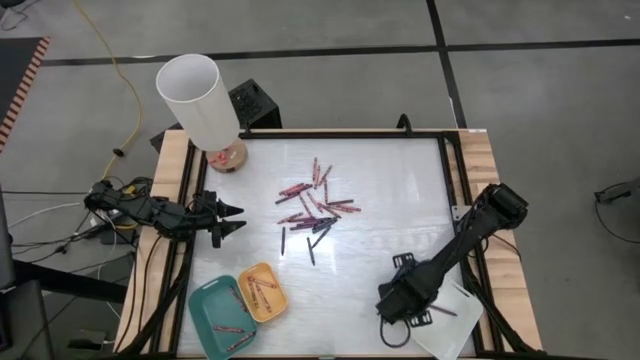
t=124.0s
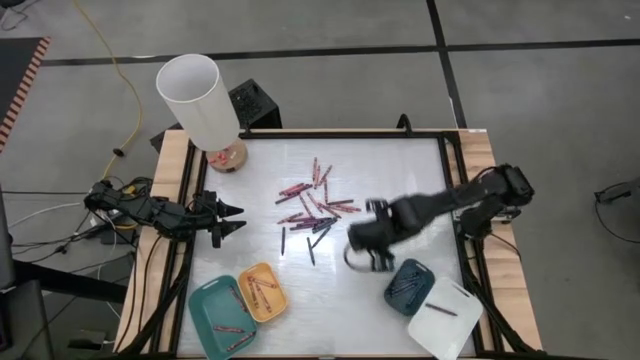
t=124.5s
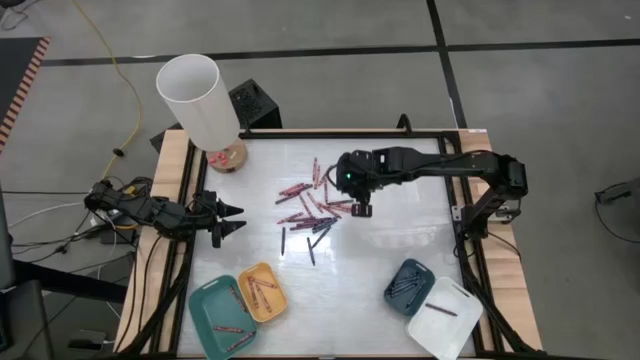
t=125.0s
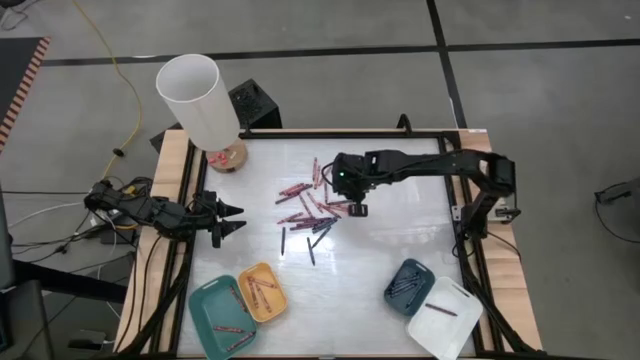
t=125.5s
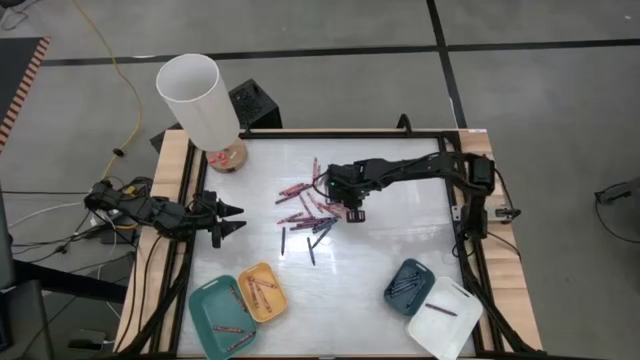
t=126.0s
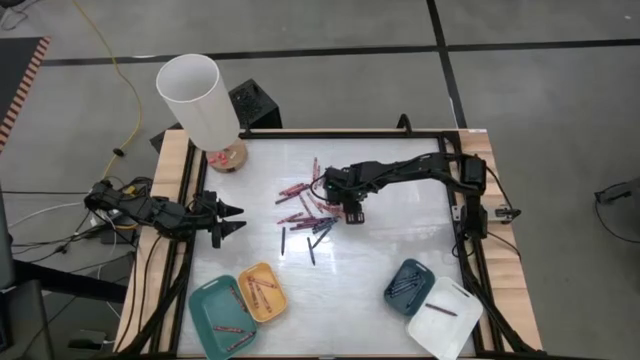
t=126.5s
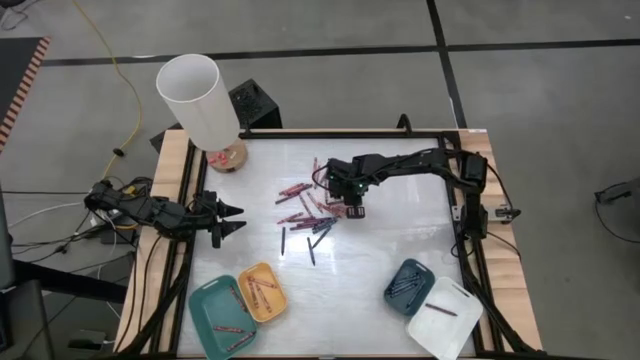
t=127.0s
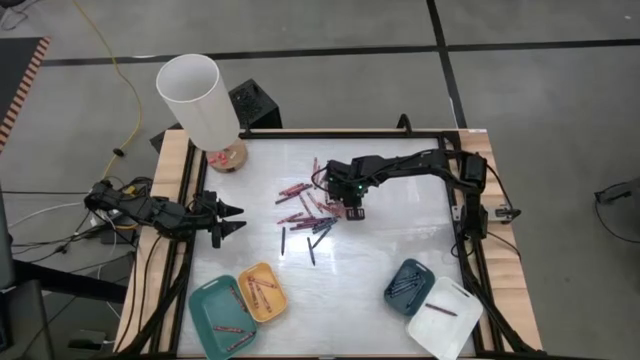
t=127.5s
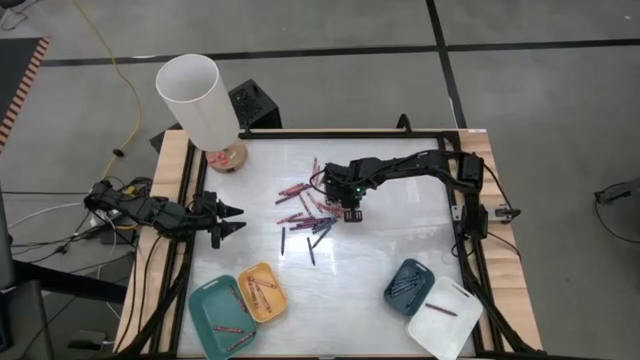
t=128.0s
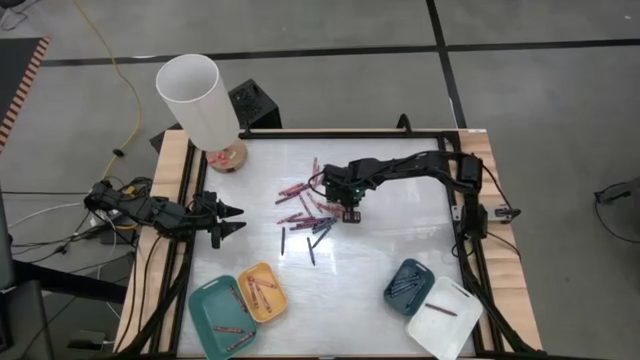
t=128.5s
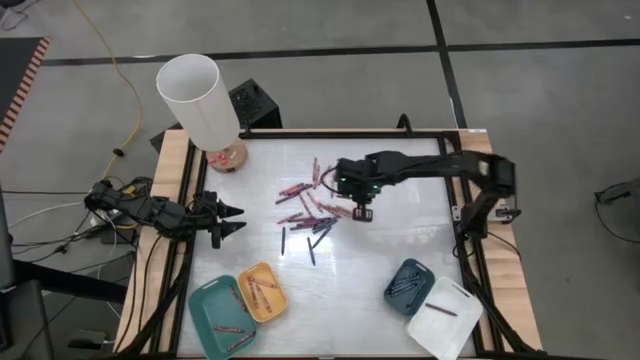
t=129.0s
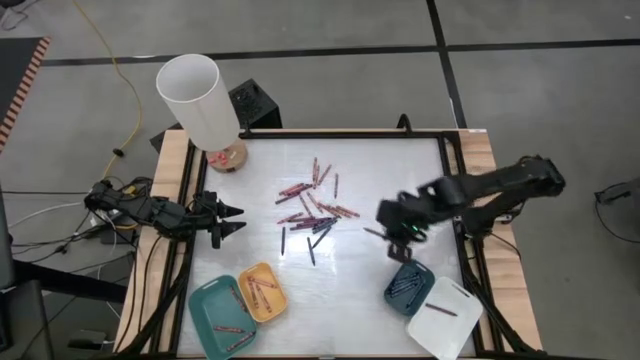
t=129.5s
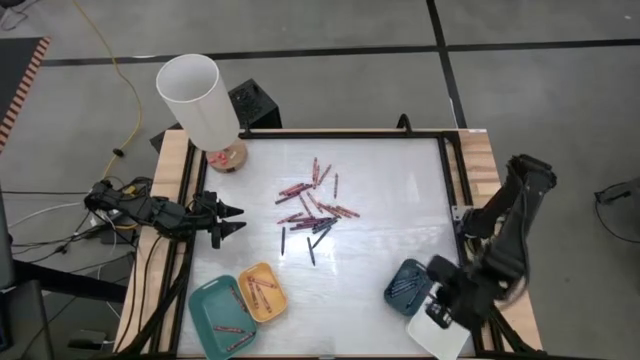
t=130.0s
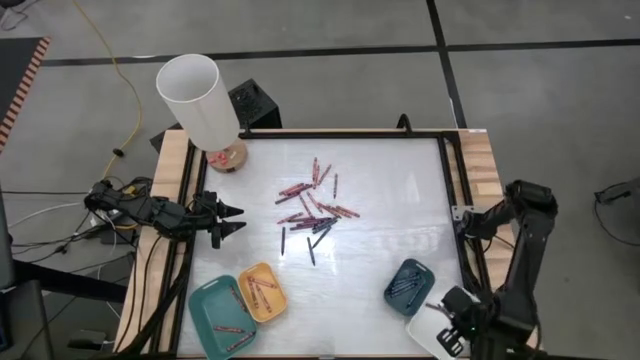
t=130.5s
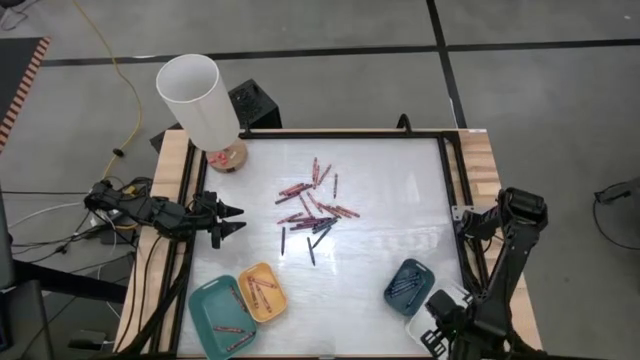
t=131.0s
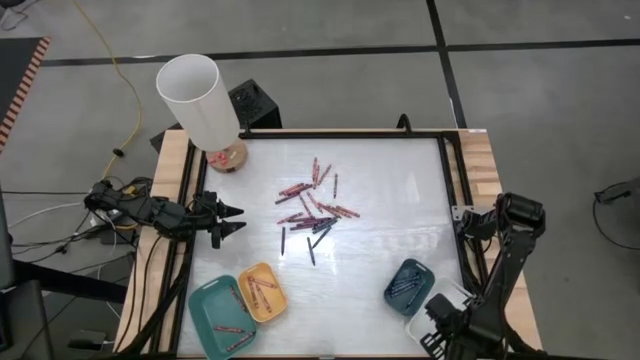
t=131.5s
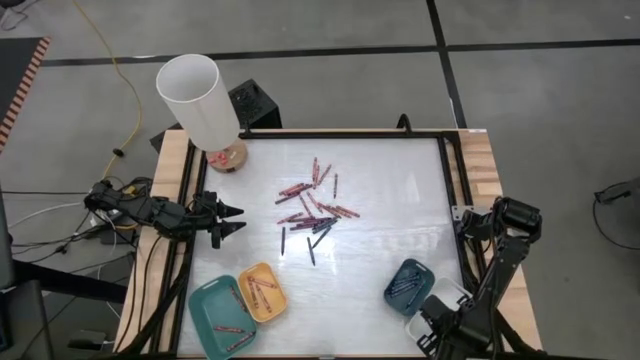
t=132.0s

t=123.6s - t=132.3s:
Task: Sort crayons
Put the purple crayon into the white bin

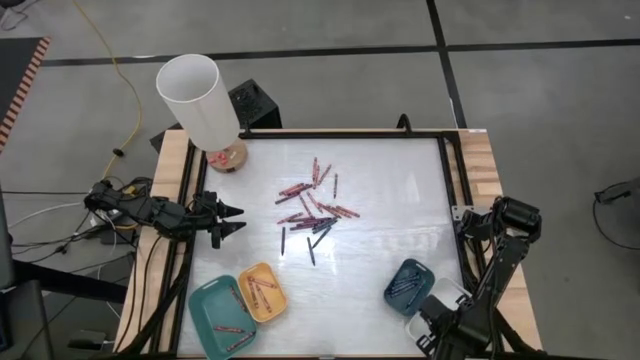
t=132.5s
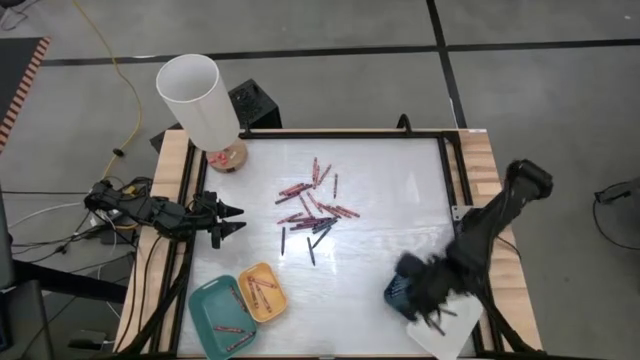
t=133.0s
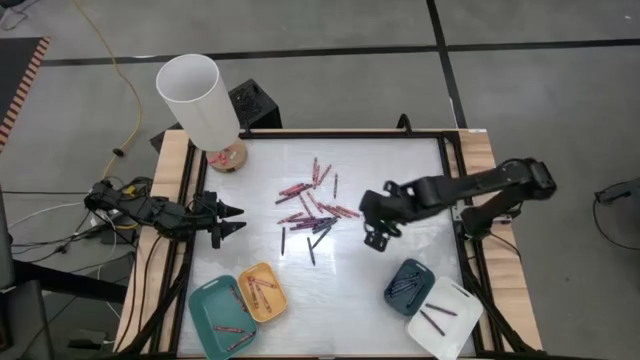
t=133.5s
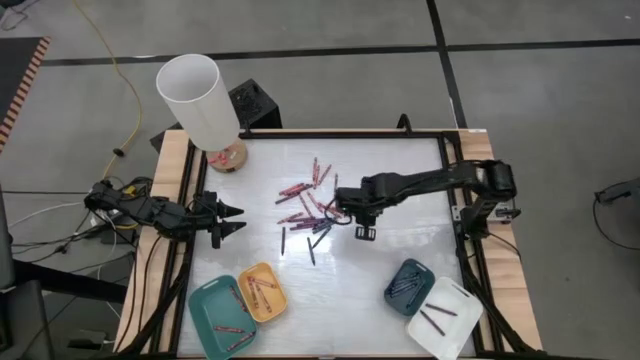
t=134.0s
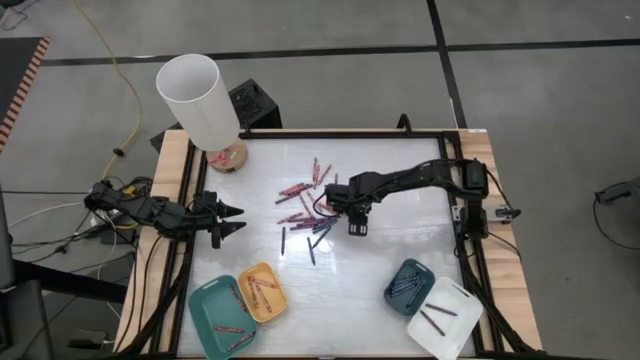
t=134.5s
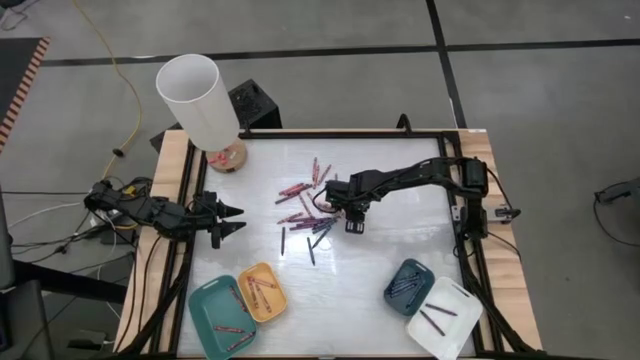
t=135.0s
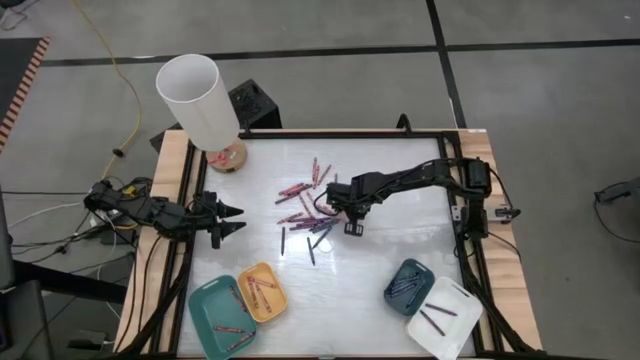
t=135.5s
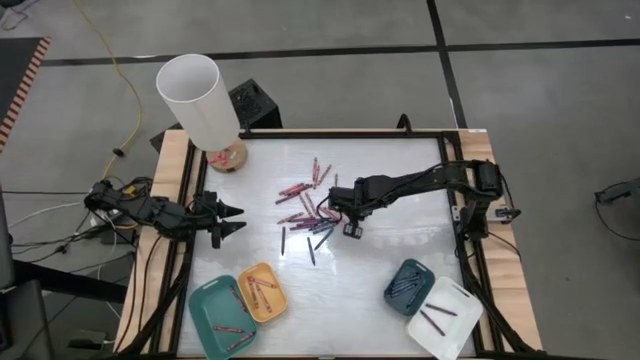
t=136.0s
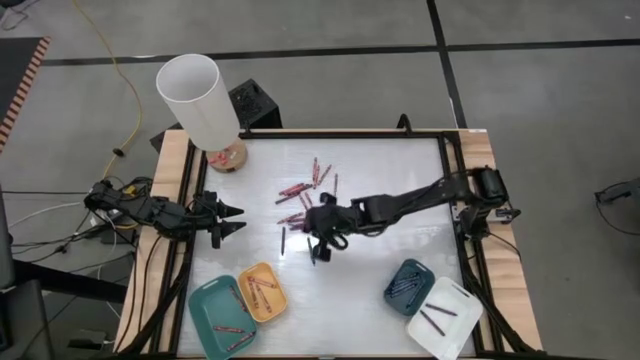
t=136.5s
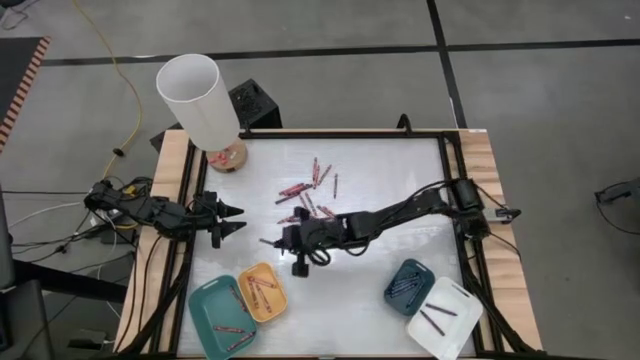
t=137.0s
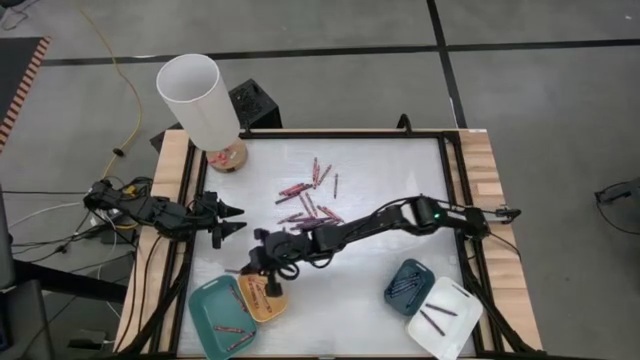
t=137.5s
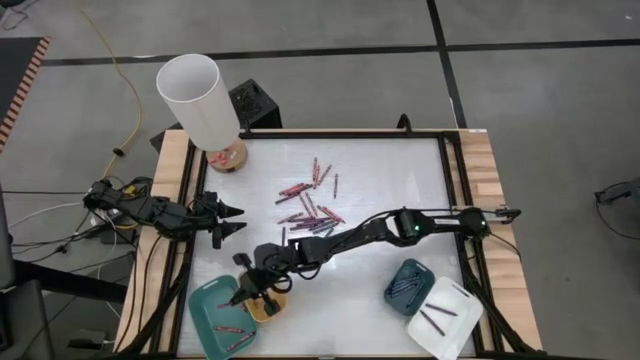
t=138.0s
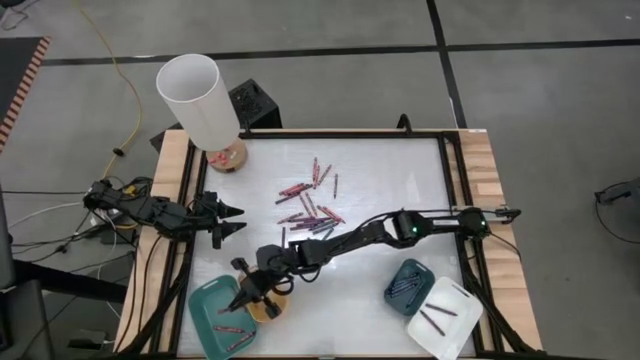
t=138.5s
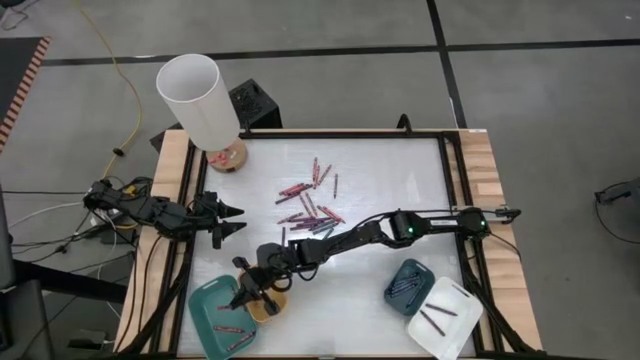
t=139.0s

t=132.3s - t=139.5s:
Put the red crayon into the blue bin

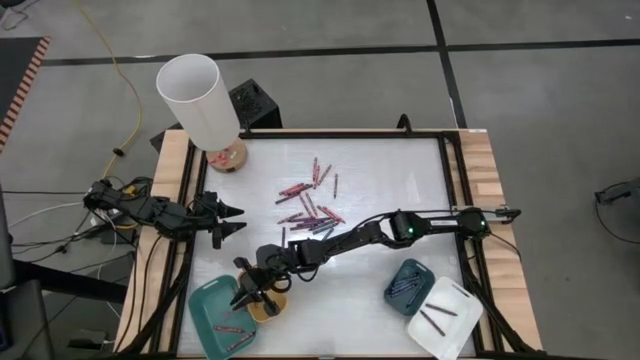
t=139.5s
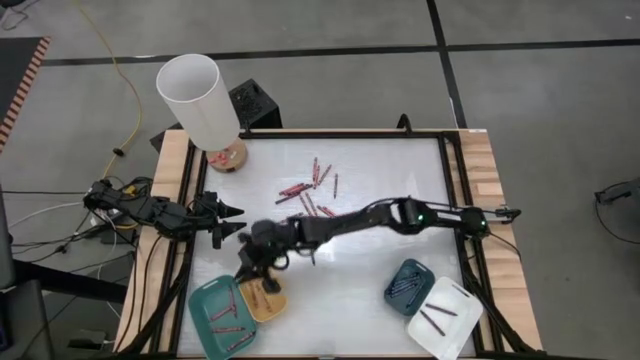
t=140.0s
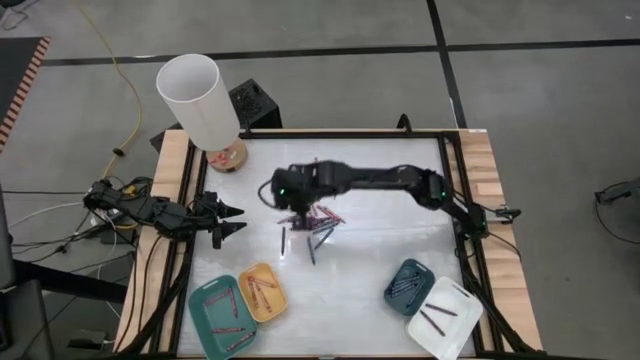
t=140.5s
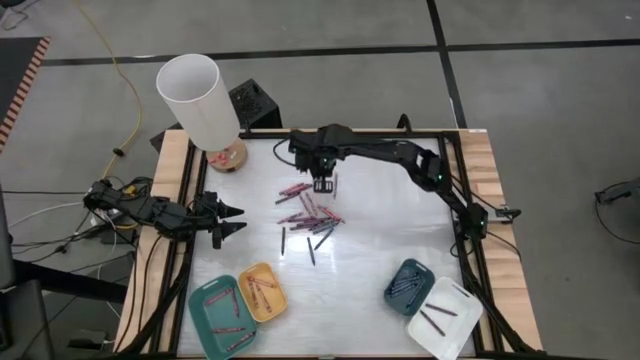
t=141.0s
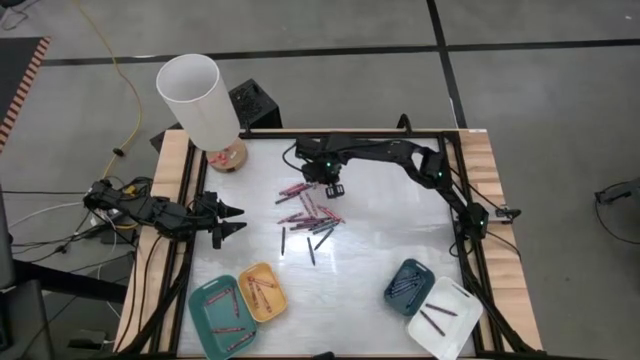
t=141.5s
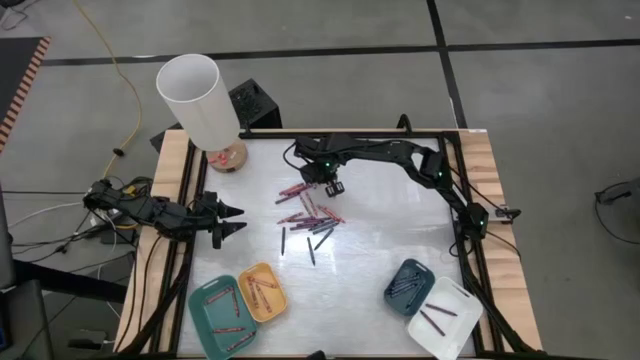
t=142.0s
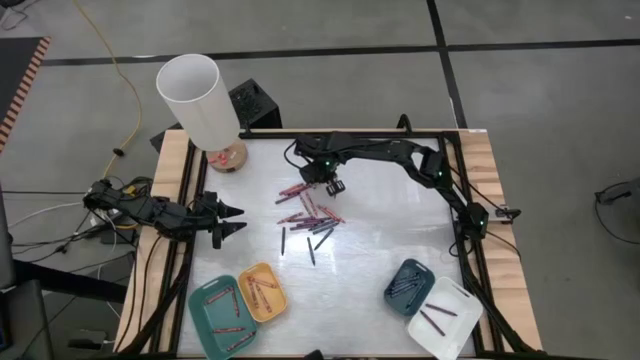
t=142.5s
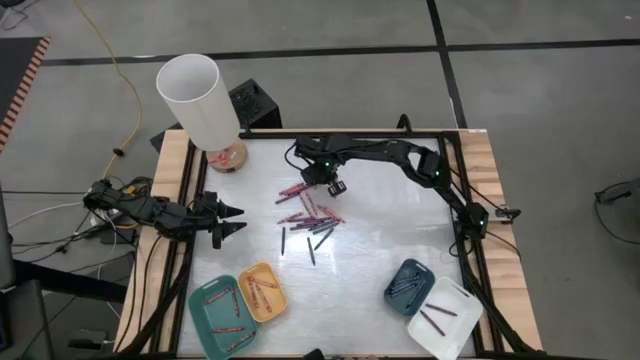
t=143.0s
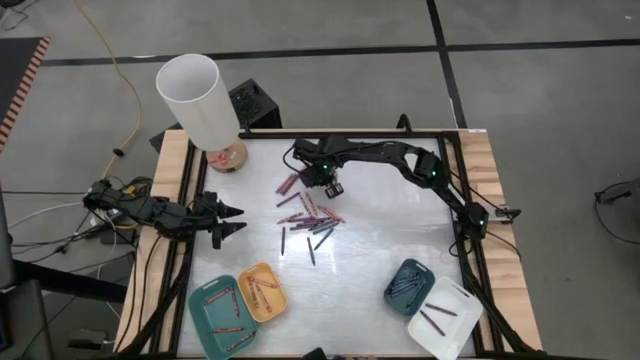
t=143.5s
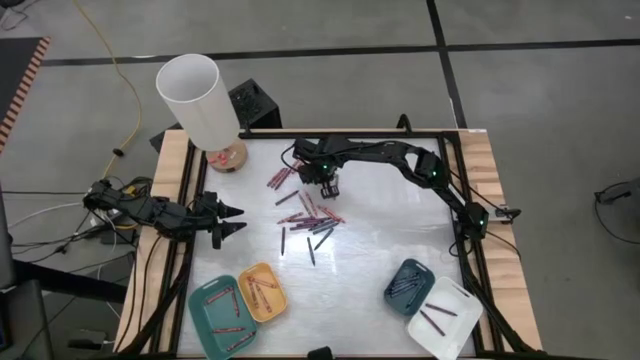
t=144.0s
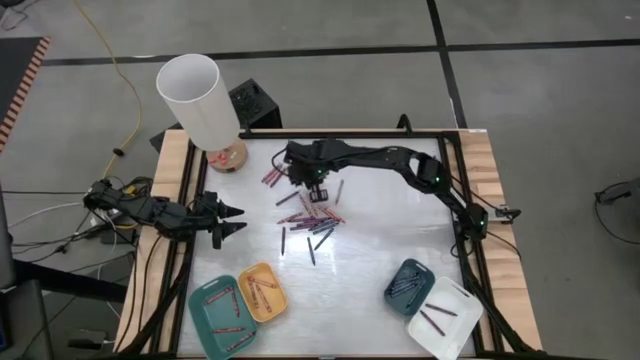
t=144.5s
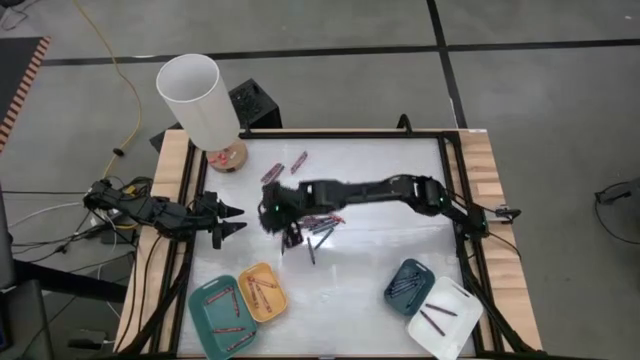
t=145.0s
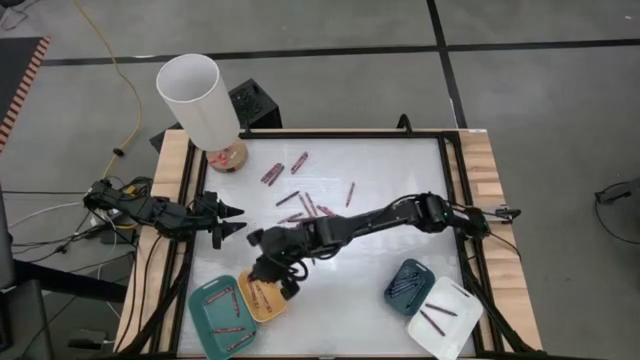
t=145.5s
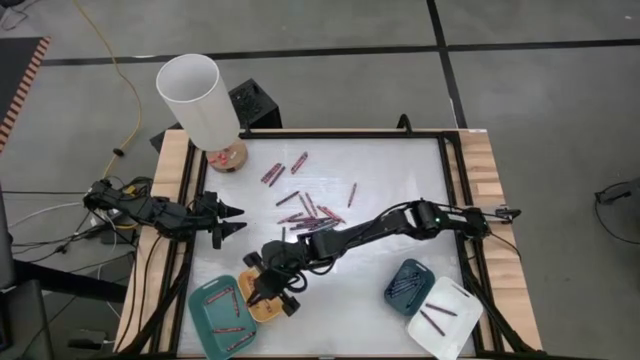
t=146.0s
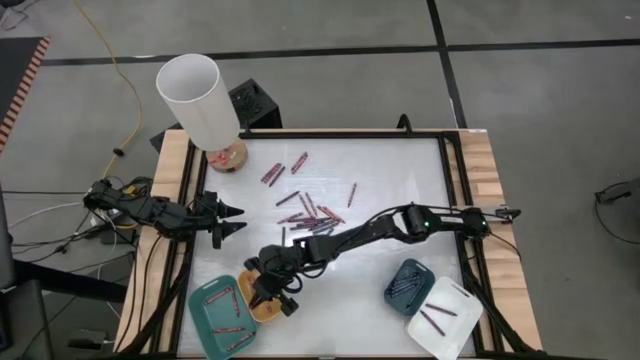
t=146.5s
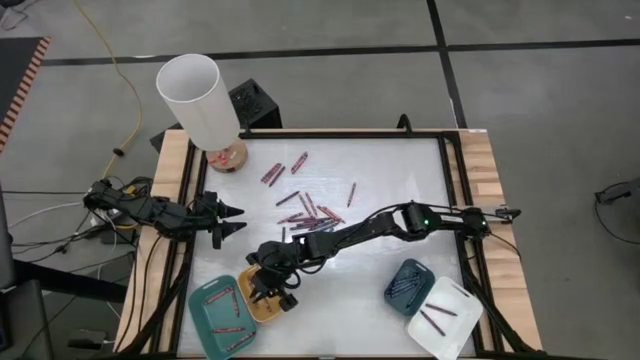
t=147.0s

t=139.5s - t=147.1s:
Put the pink crayon into the yellow bin
